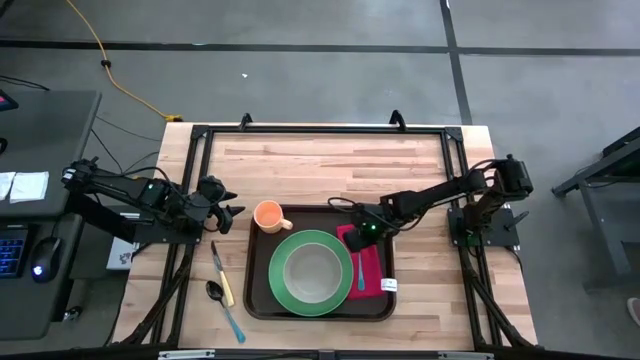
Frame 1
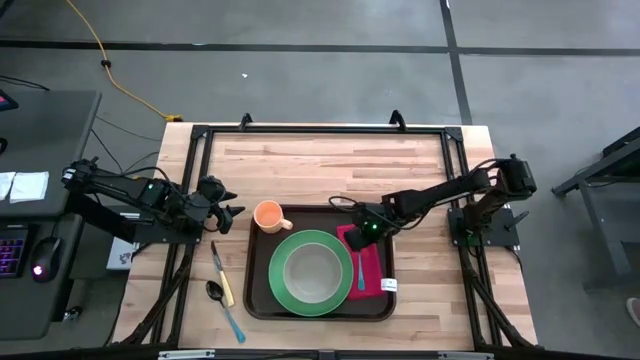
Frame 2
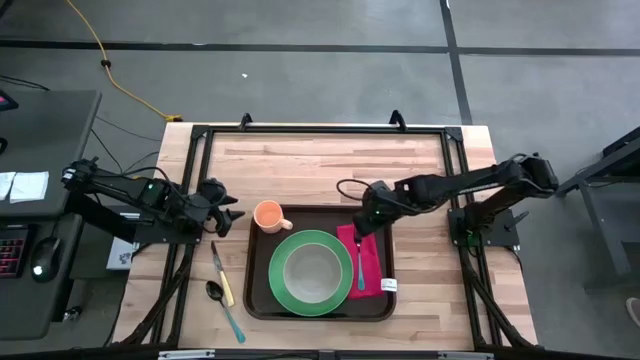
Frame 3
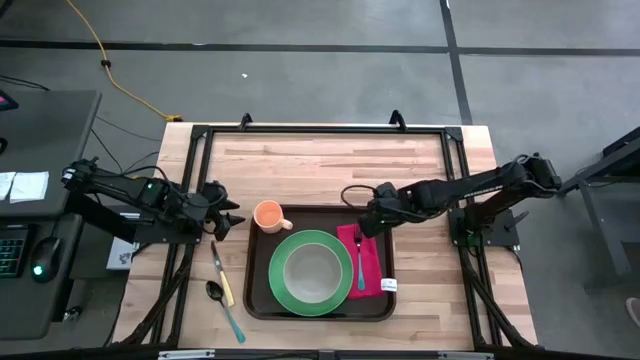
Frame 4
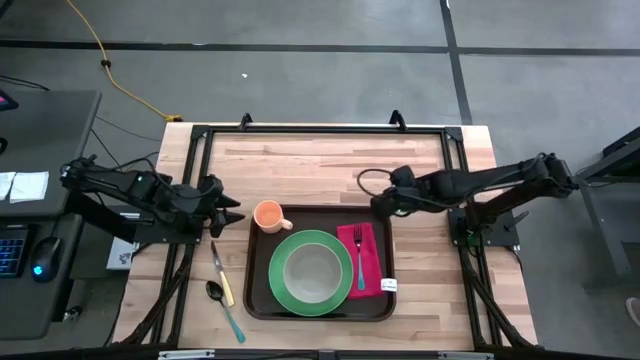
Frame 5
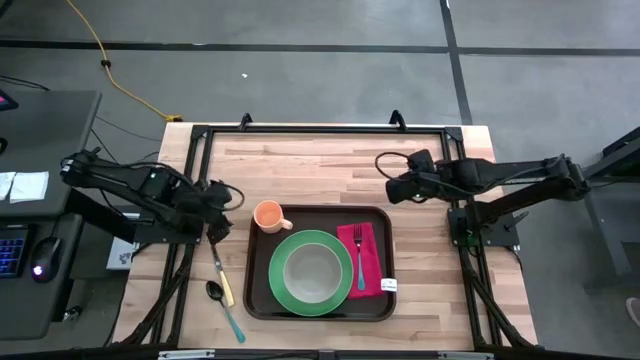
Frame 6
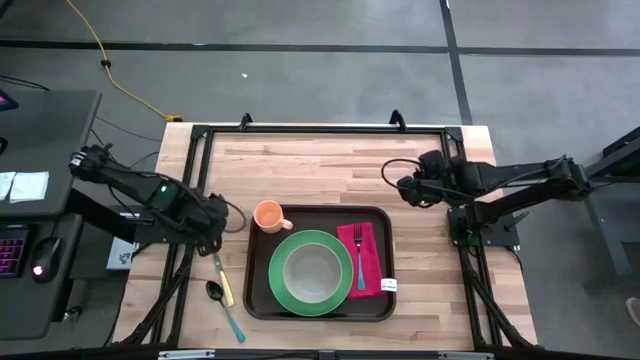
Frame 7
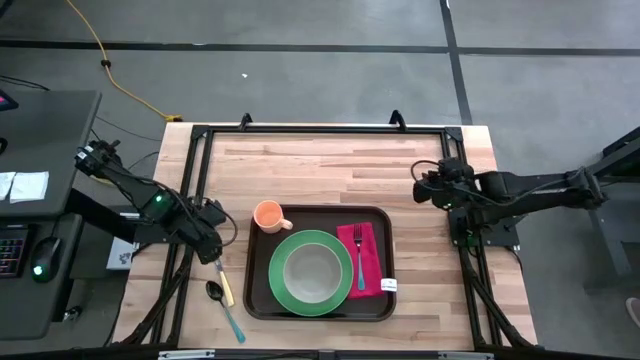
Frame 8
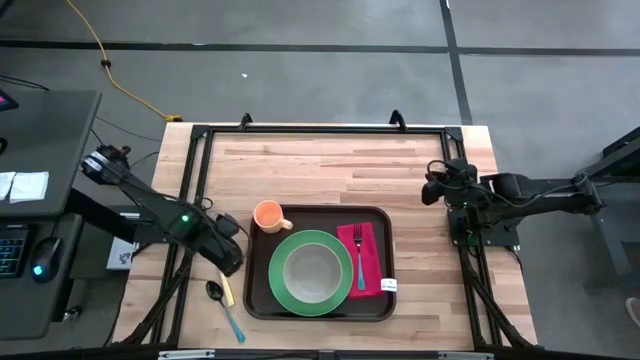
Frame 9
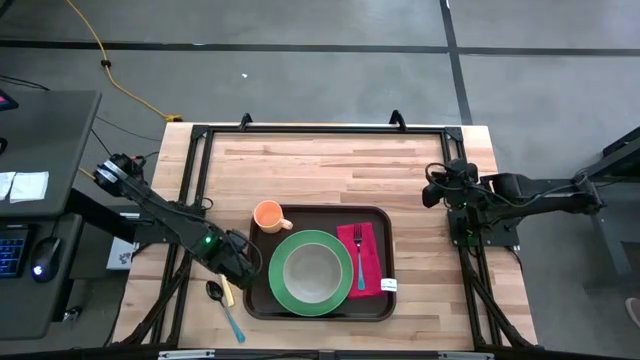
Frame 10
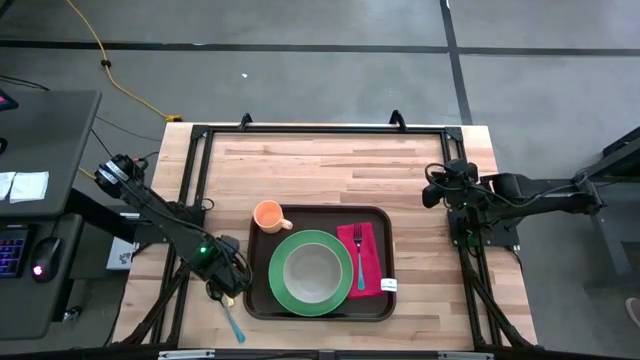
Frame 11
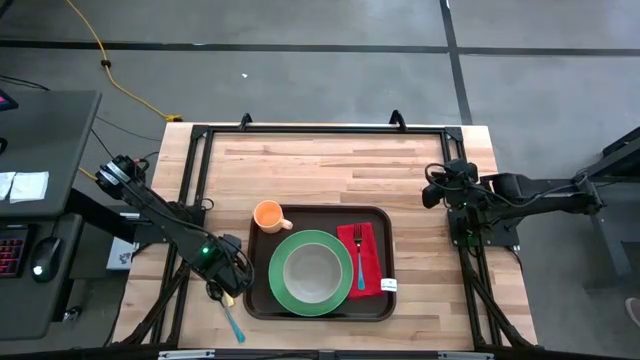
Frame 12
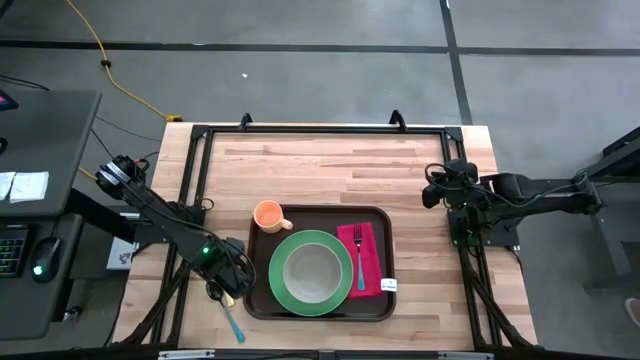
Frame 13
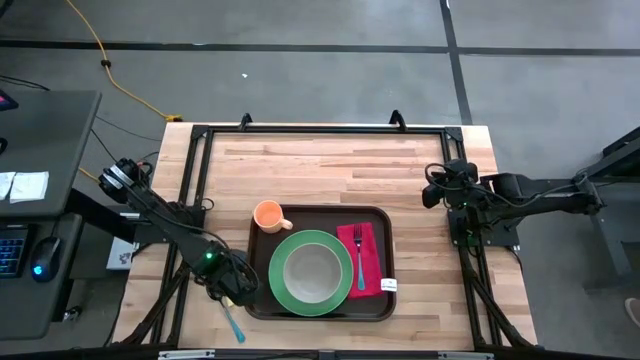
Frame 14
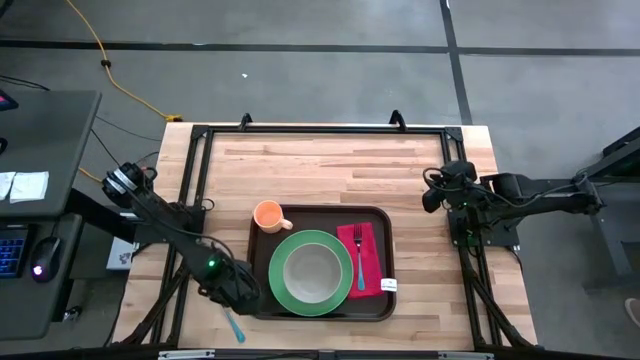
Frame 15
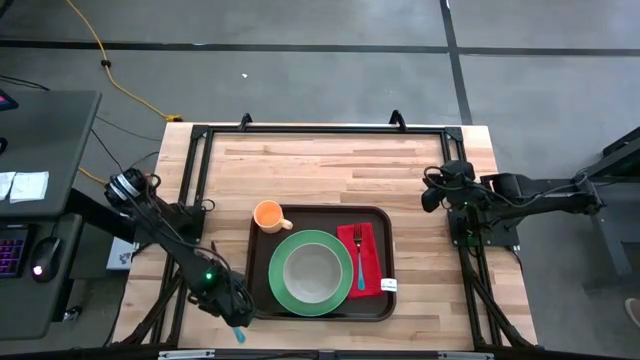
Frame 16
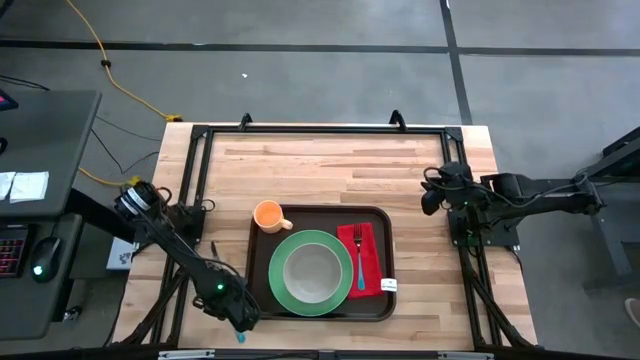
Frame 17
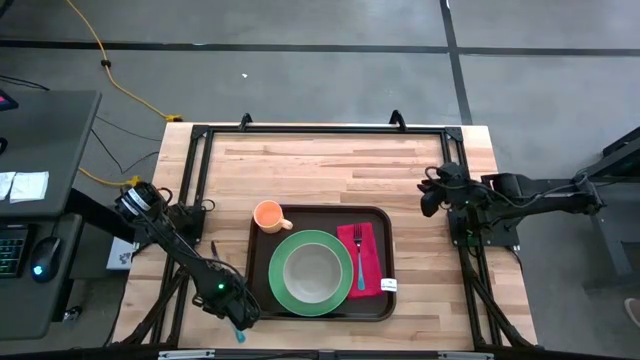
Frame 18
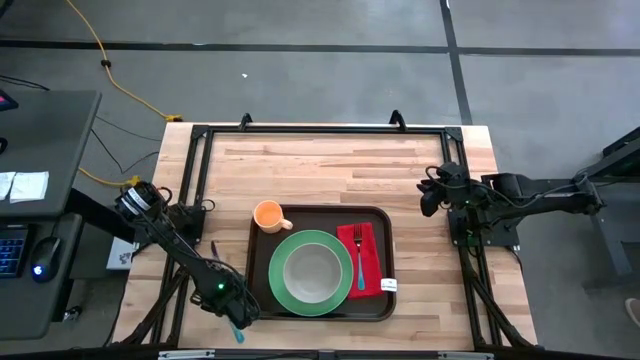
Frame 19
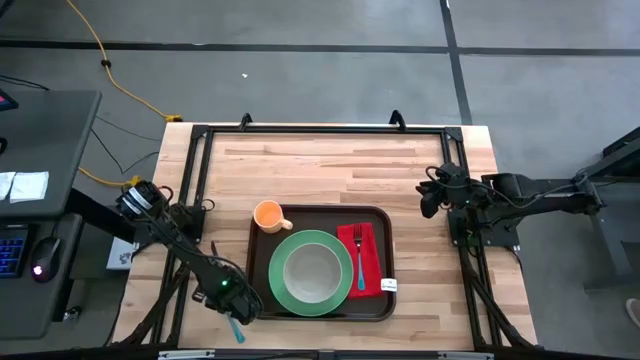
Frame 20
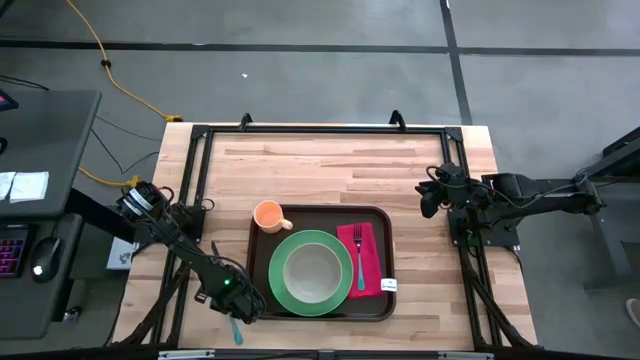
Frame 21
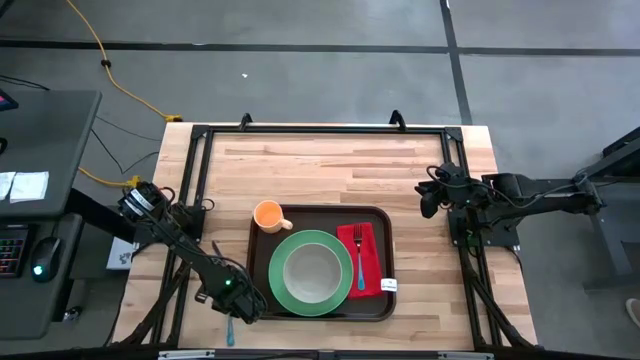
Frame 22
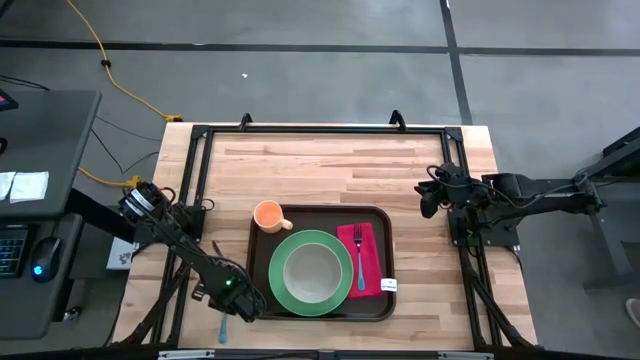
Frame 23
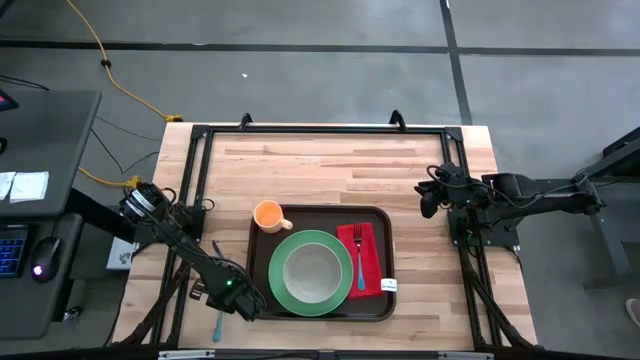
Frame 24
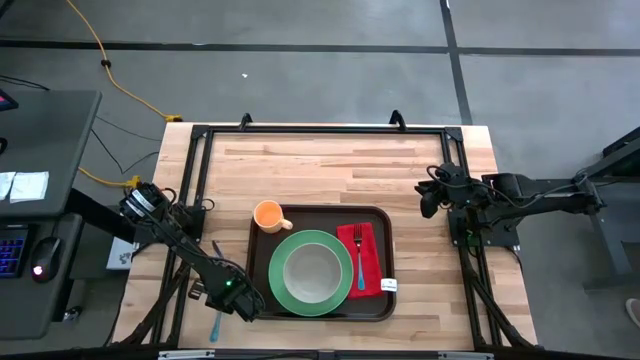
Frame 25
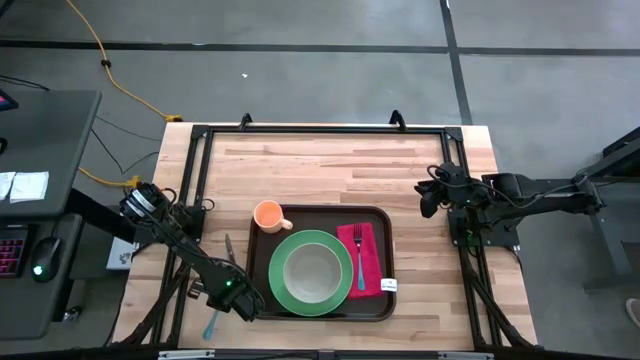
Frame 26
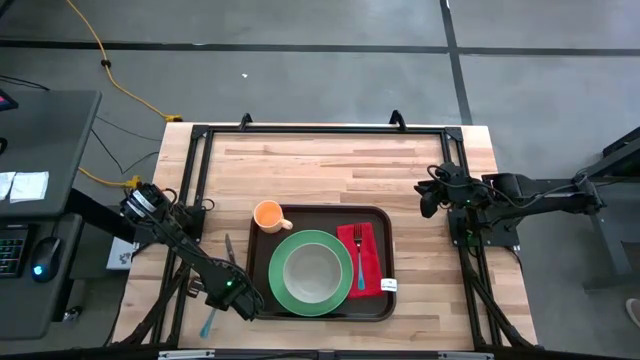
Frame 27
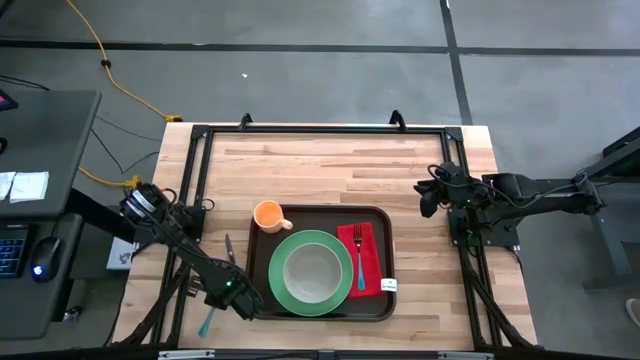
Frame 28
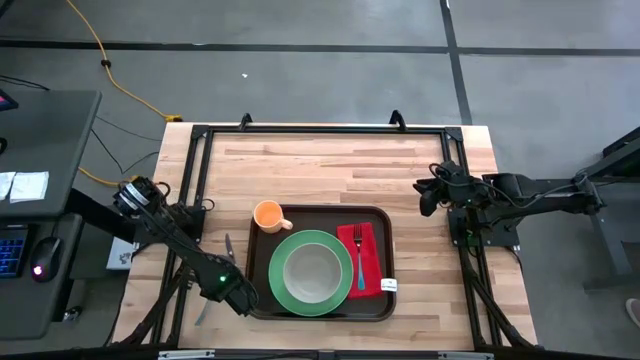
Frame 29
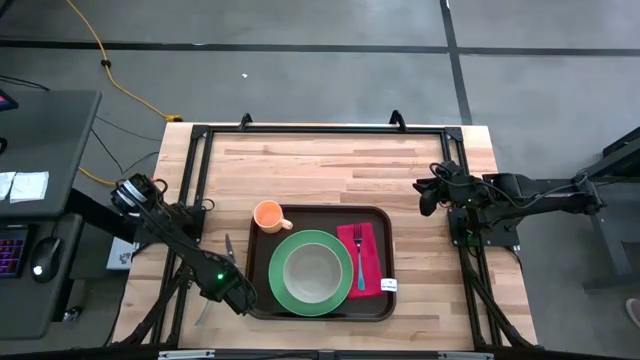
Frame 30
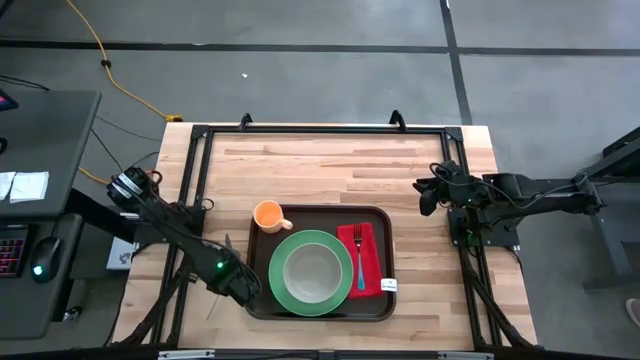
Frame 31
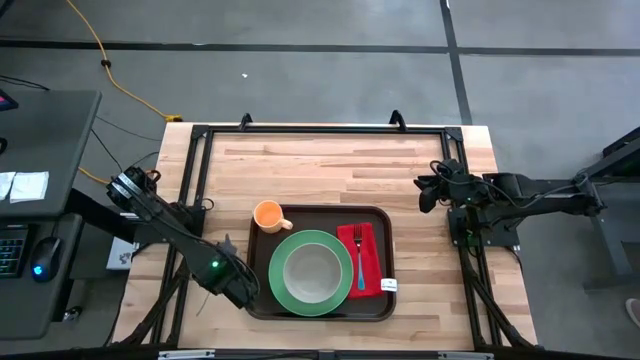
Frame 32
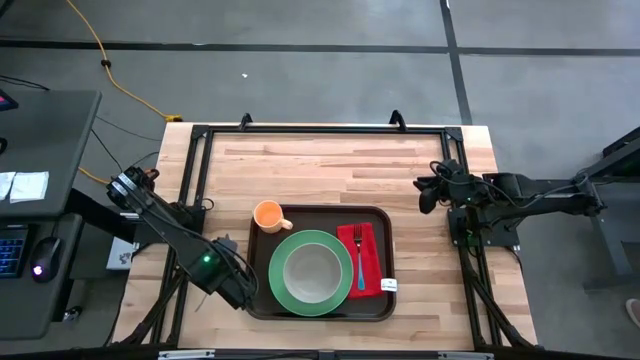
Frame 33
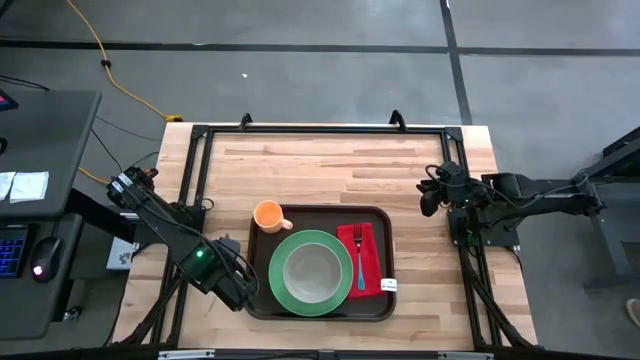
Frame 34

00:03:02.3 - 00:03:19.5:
Task: Set up tray
Put the blue spoon on the red table napkin to the left of the blue fork

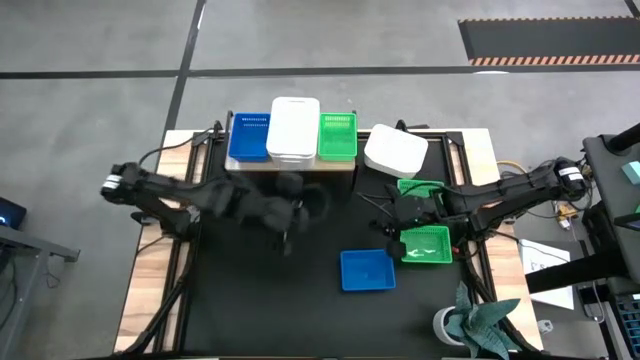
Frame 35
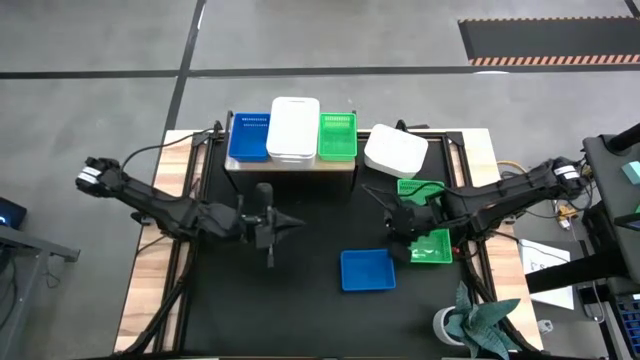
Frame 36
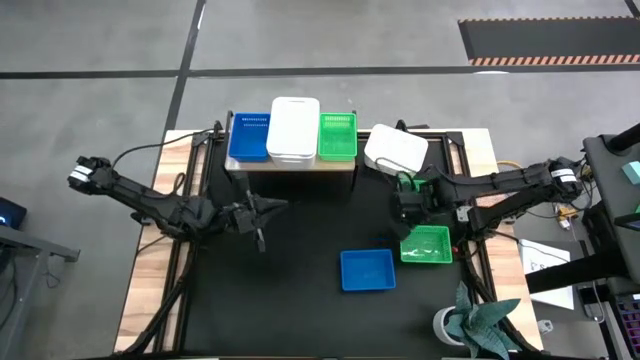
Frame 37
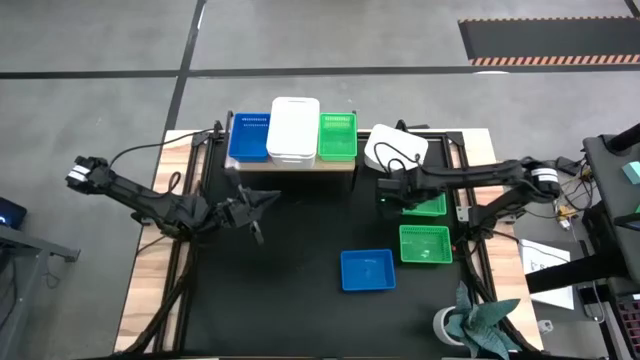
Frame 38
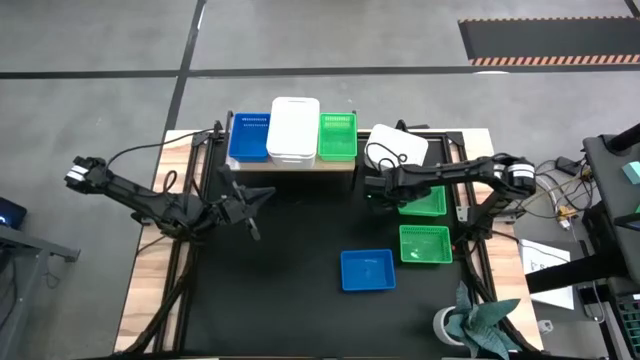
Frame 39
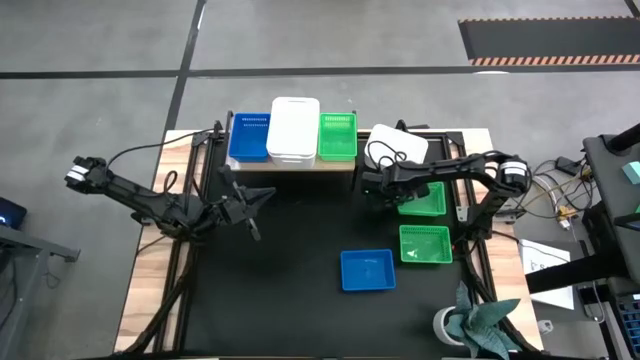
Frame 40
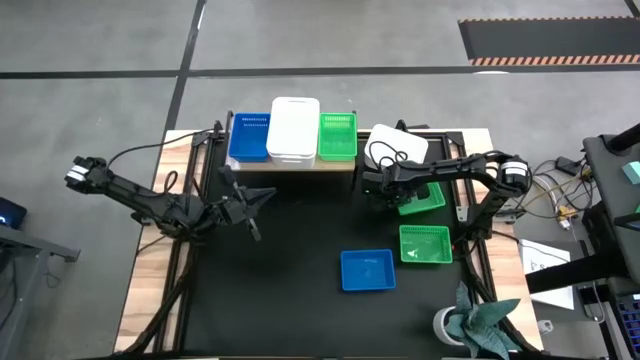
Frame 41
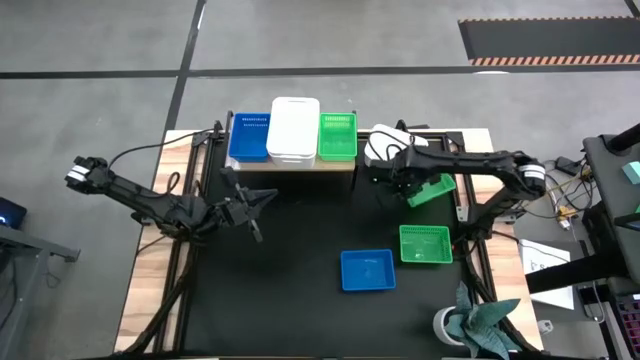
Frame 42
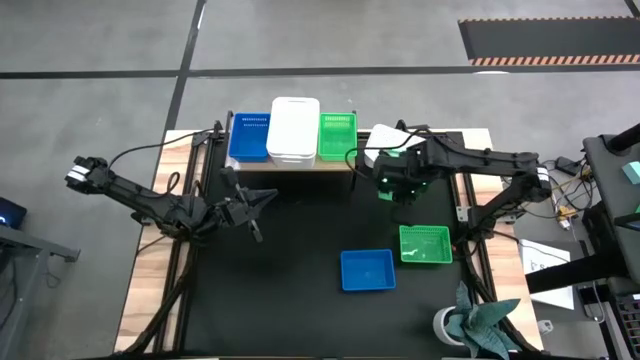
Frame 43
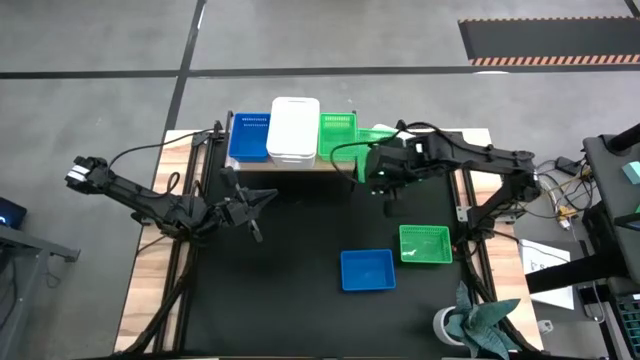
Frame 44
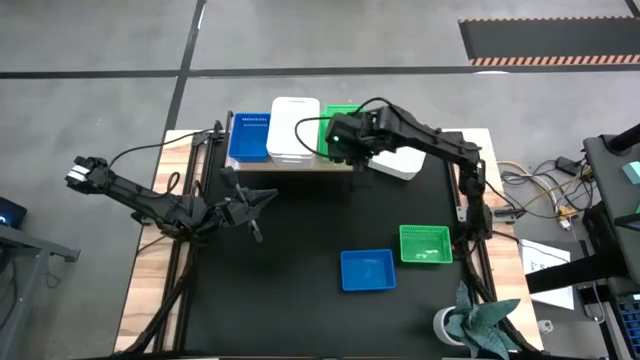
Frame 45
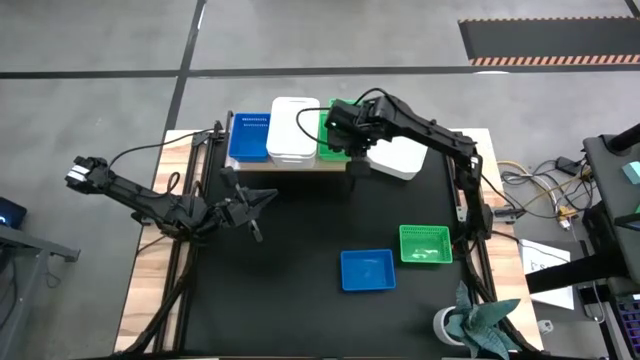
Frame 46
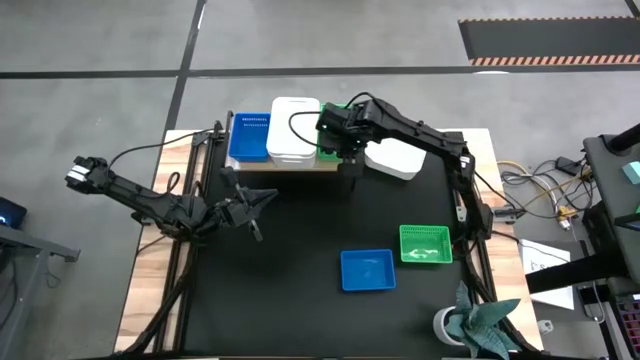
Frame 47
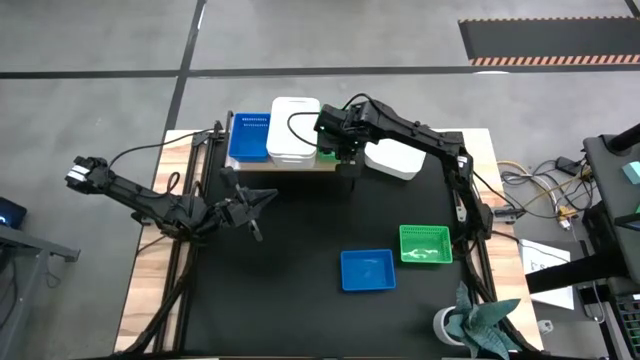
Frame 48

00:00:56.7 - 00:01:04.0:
Task: Stack baskets on shelf by color
Stack the top green bin on top of the green bin on the shelf
